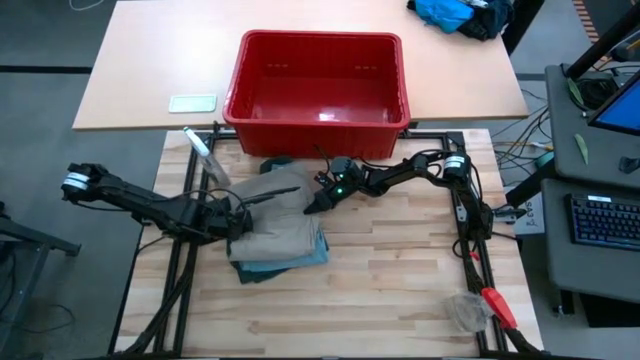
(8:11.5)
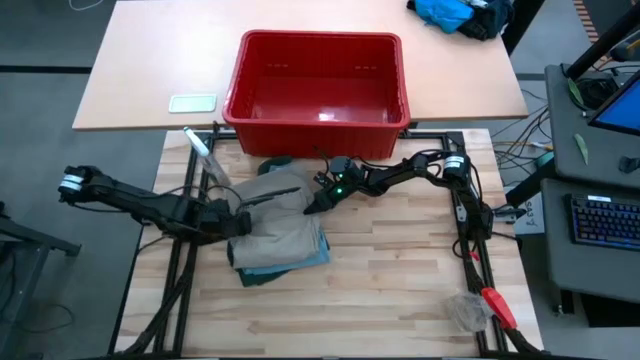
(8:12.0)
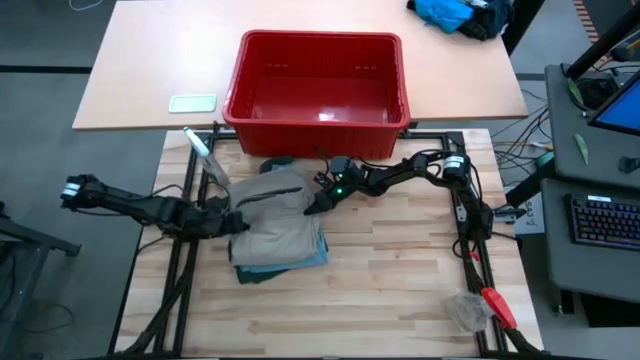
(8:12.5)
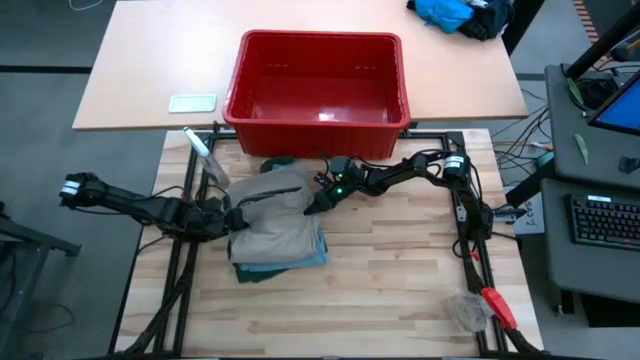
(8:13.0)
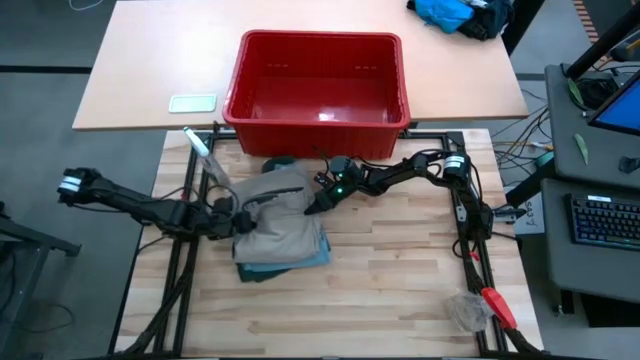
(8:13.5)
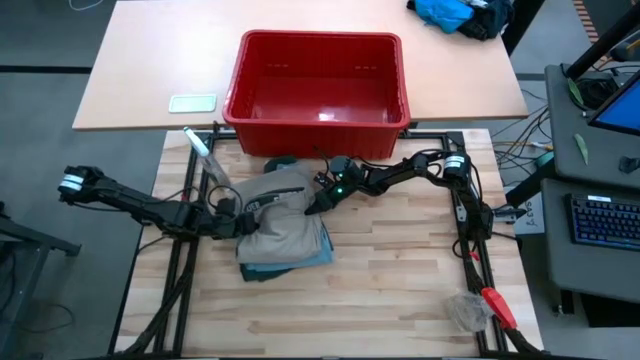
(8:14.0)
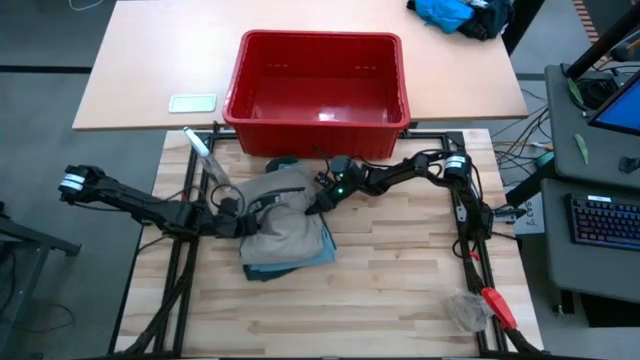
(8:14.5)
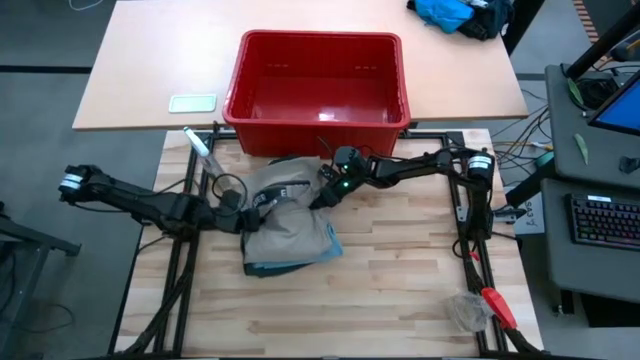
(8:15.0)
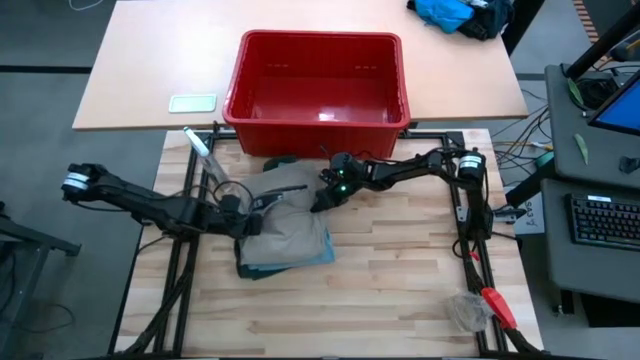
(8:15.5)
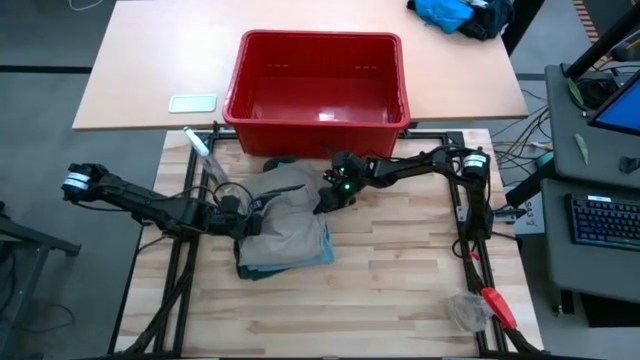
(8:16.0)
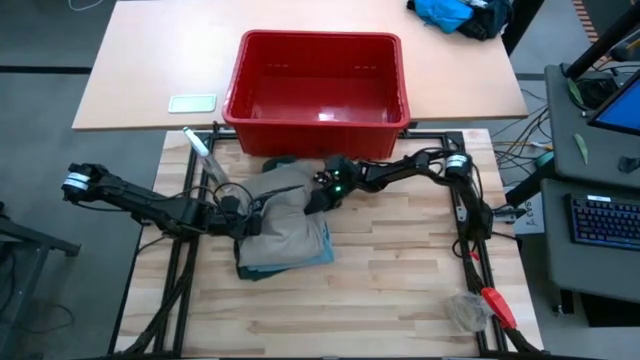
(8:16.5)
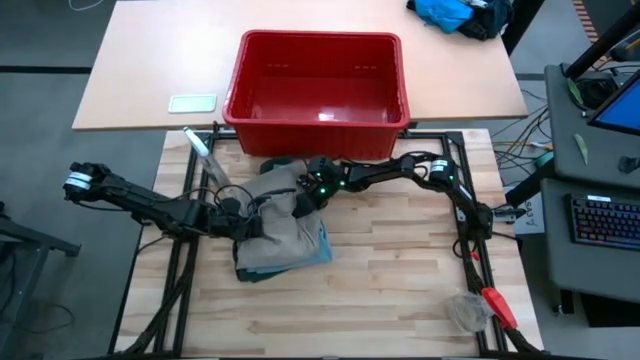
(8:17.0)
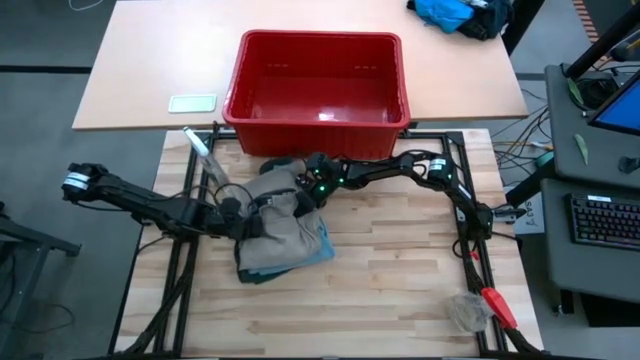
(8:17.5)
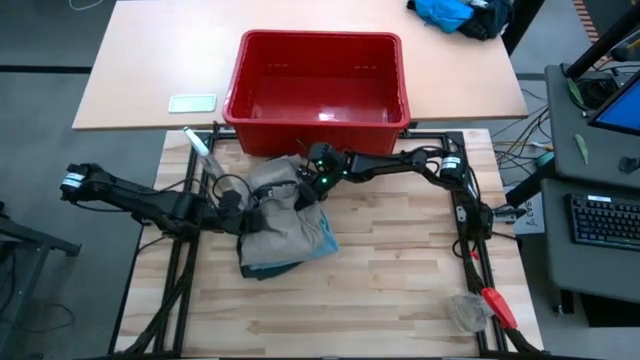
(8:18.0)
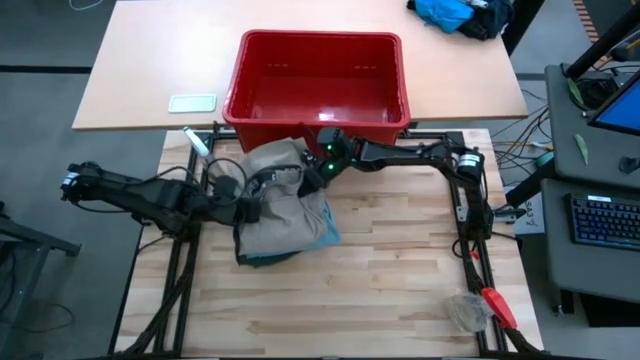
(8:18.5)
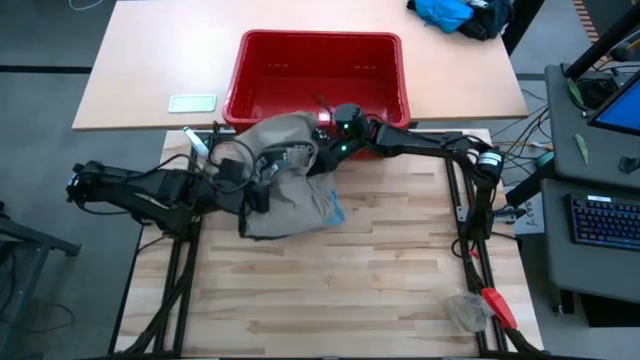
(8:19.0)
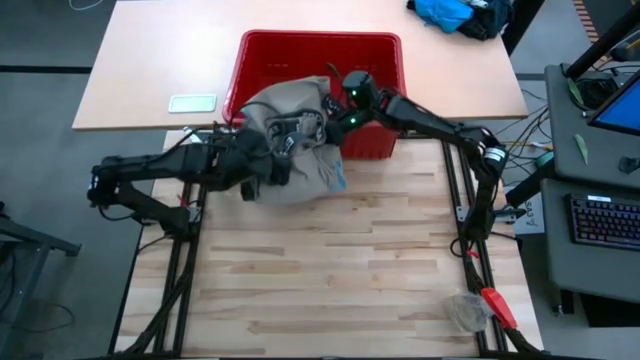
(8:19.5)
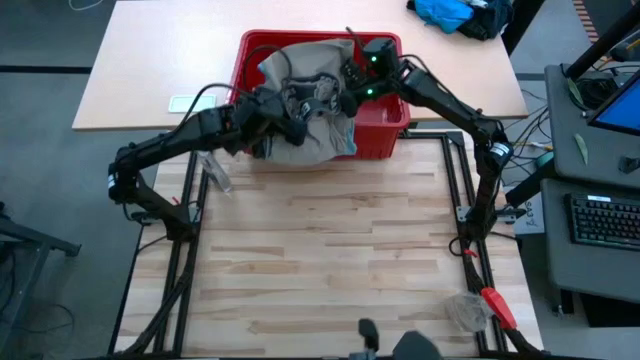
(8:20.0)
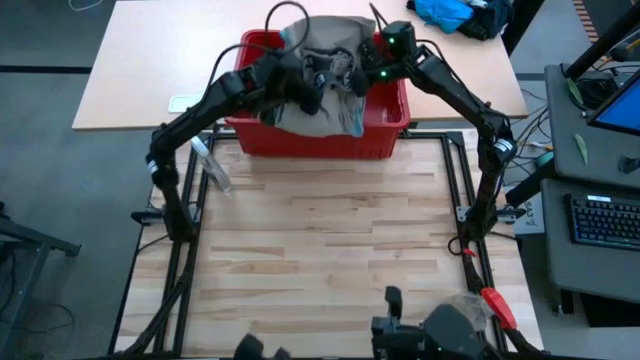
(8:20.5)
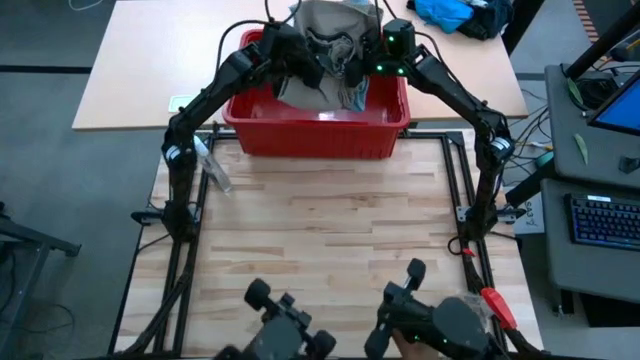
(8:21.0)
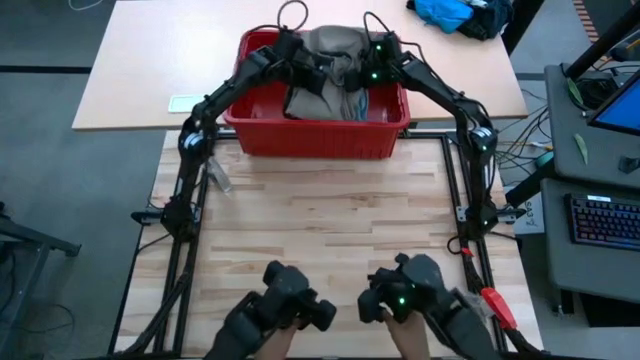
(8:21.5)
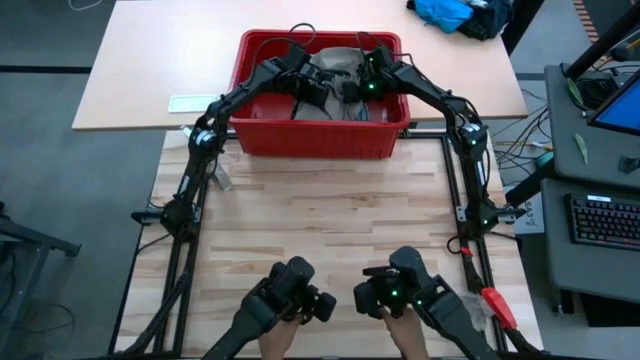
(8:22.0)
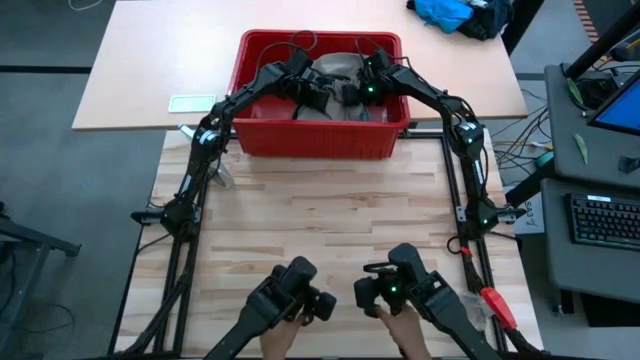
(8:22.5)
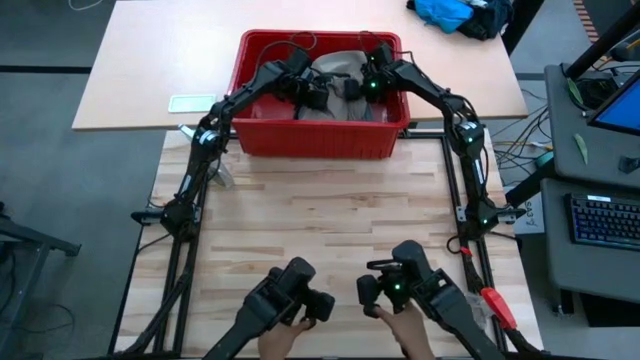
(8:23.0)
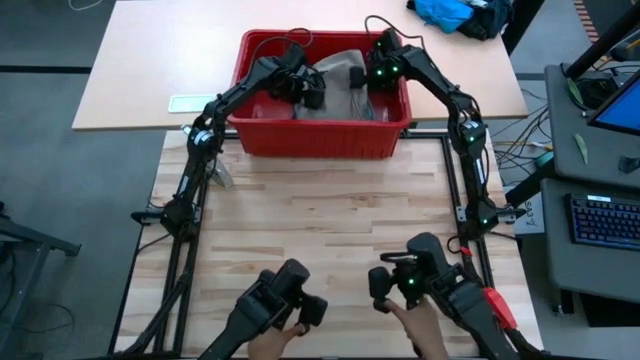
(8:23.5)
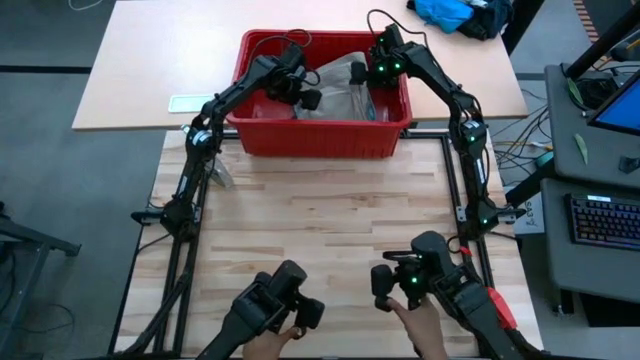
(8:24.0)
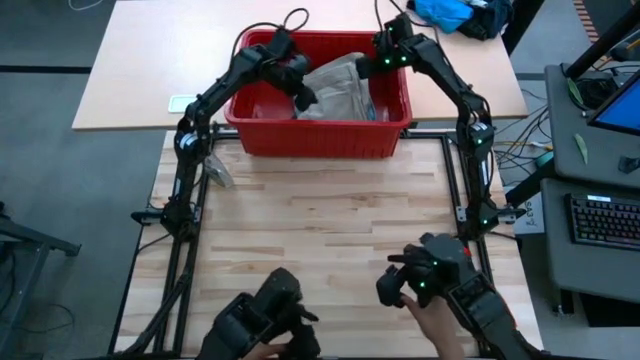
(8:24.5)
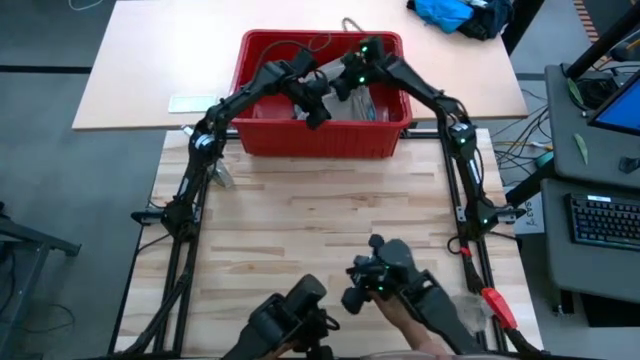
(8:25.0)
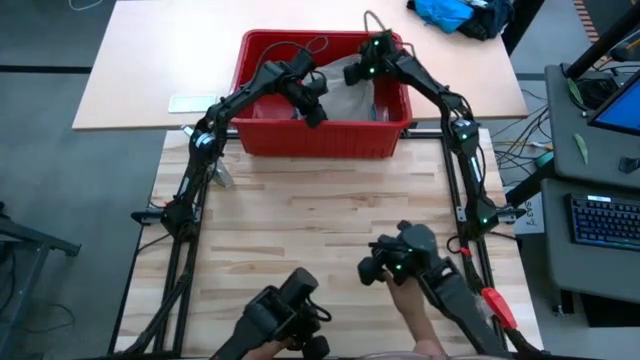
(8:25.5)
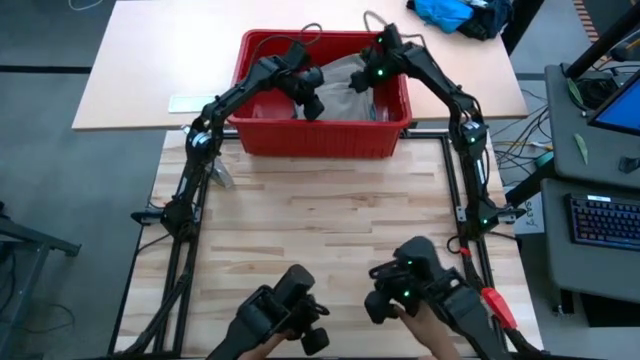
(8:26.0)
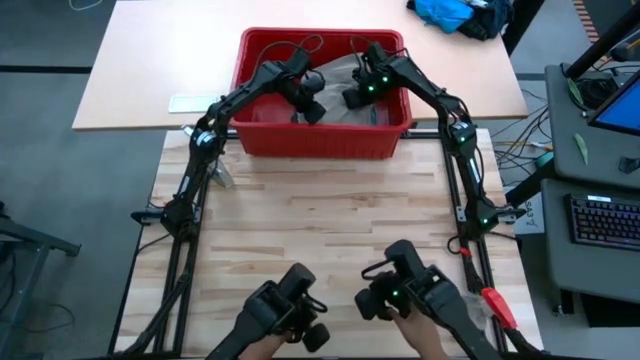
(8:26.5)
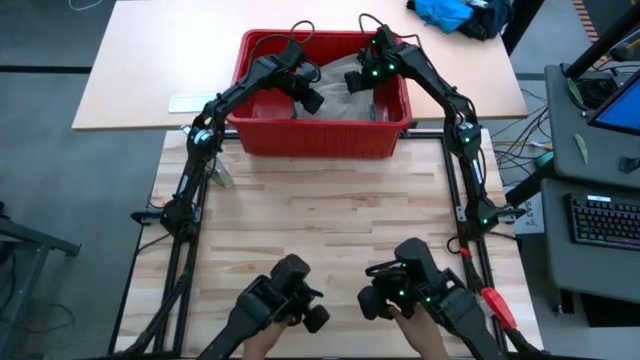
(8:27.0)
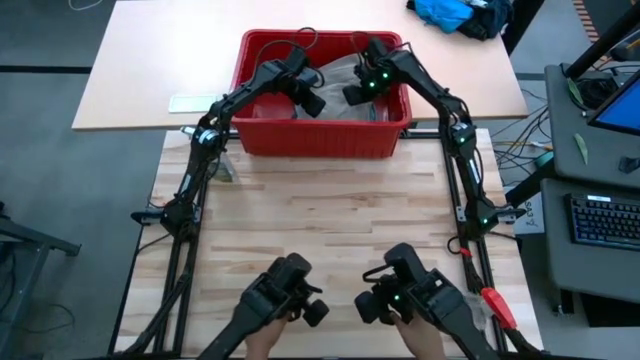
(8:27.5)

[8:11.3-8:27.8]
Task: Fold Laundry from Bin
Put the stacked folded clothes into the red bin

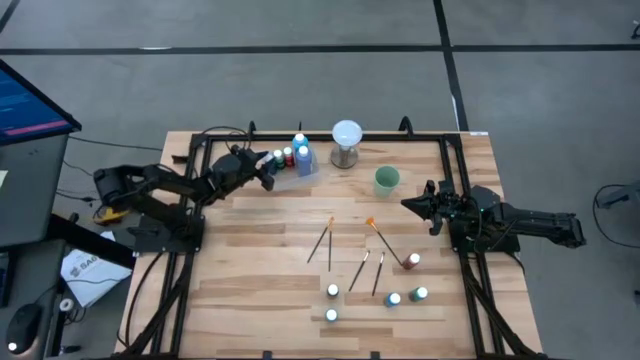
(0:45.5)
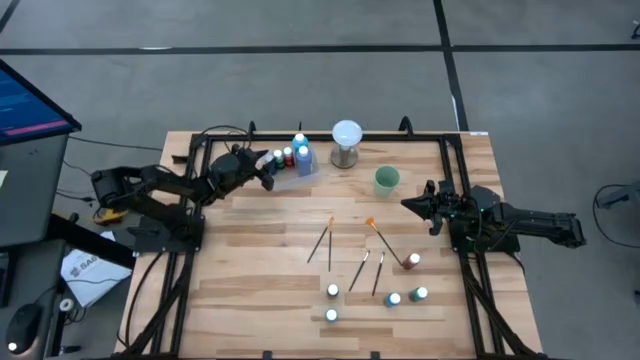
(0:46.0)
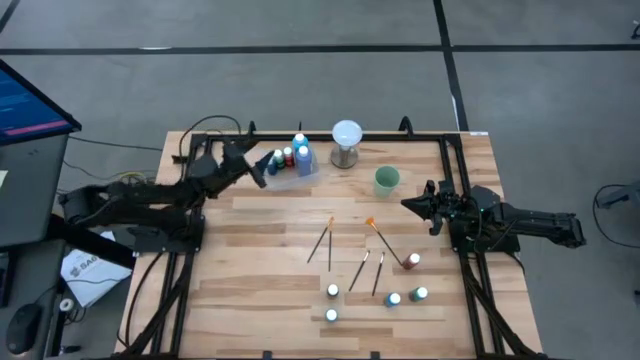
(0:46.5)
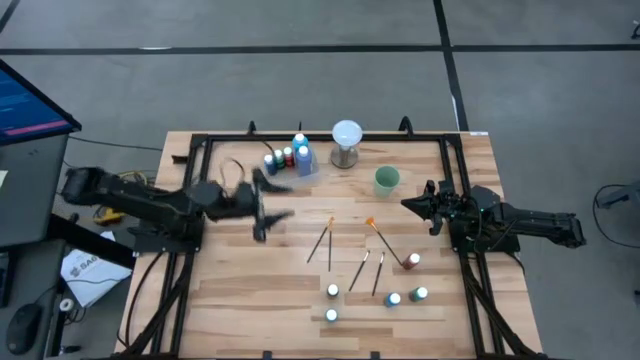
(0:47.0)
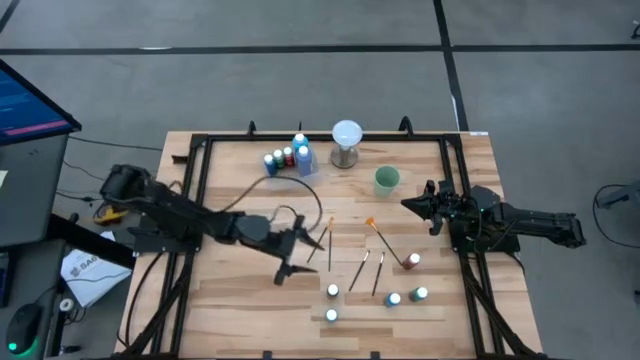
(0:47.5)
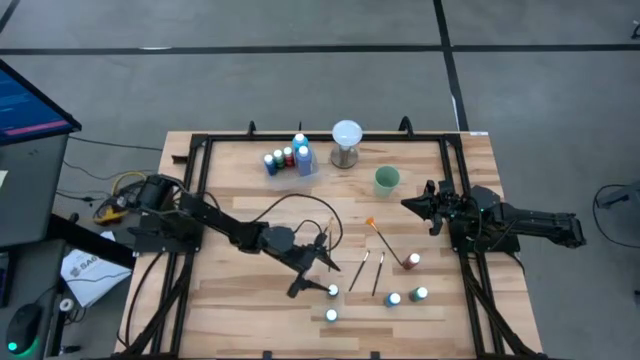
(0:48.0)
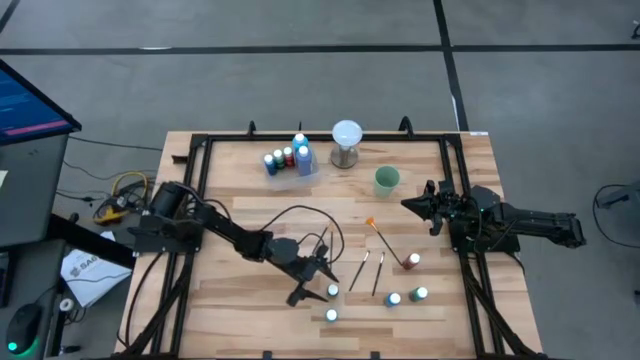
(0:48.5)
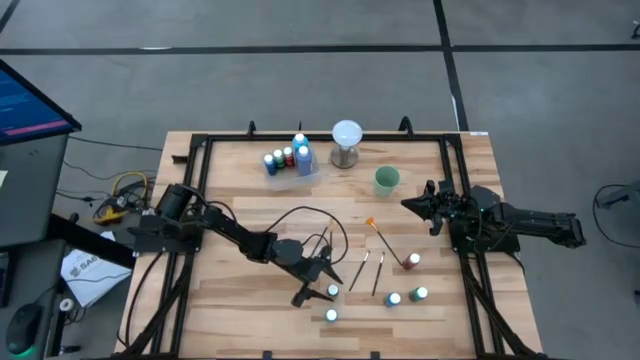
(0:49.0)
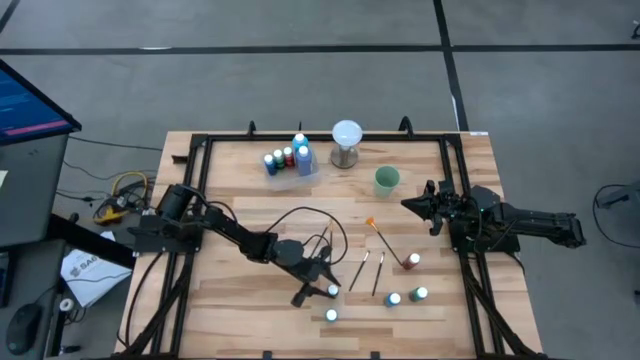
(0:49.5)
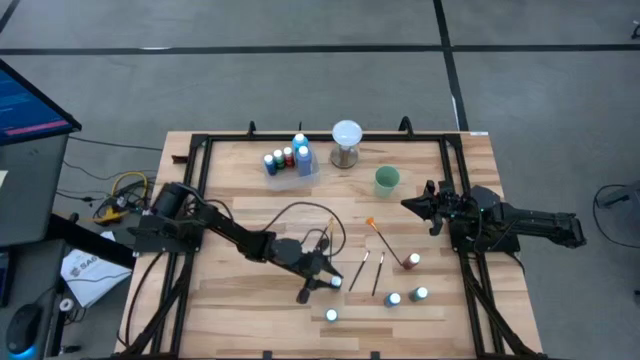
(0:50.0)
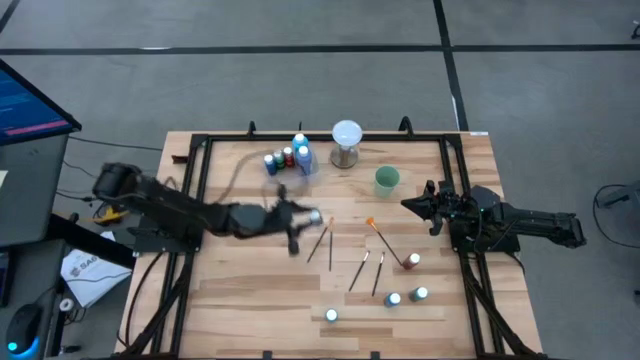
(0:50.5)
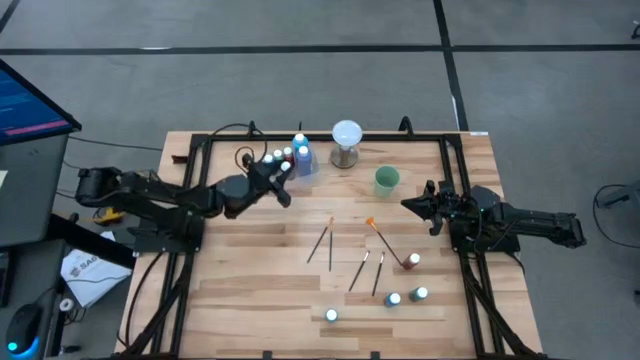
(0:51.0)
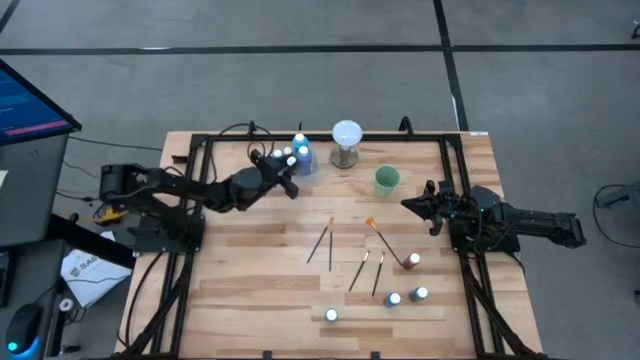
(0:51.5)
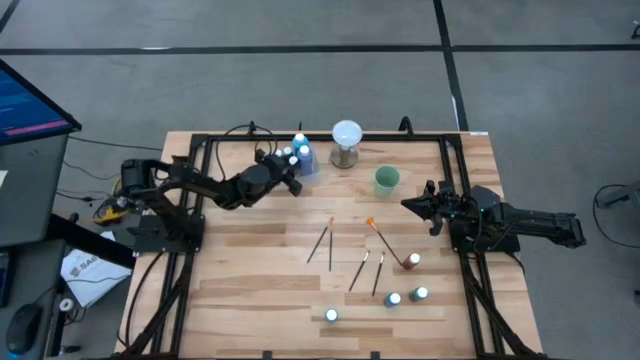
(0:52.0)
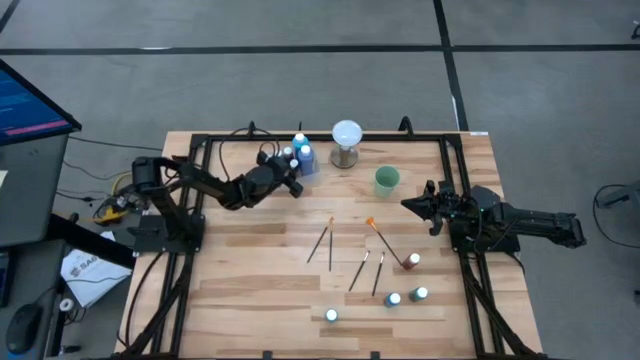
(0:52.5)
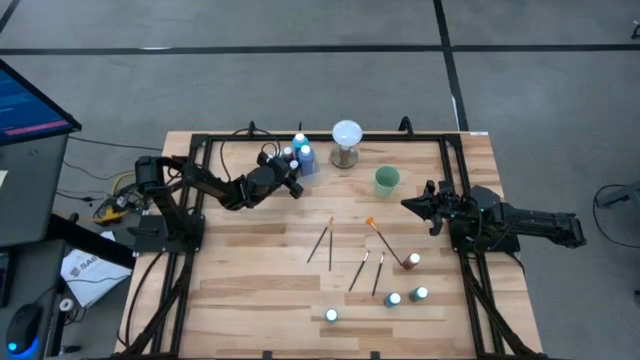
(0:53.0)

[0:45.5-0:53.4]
Task: Pick & Place Paint Supplies
Put the small black paint bottle into the transparent bin
